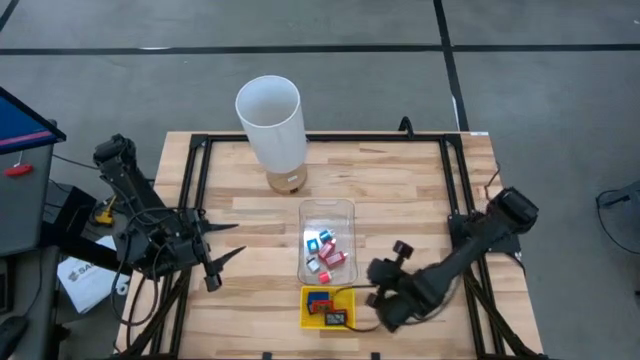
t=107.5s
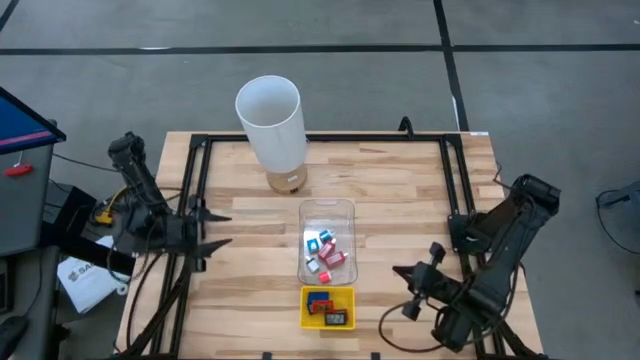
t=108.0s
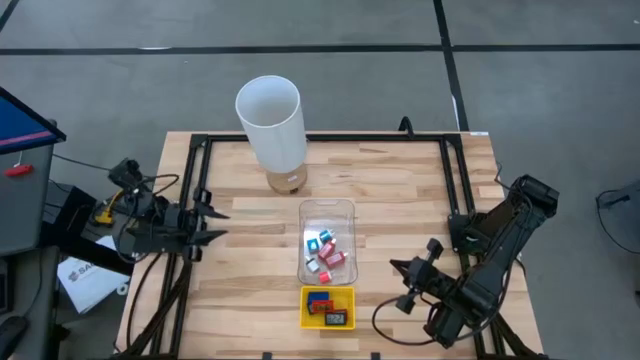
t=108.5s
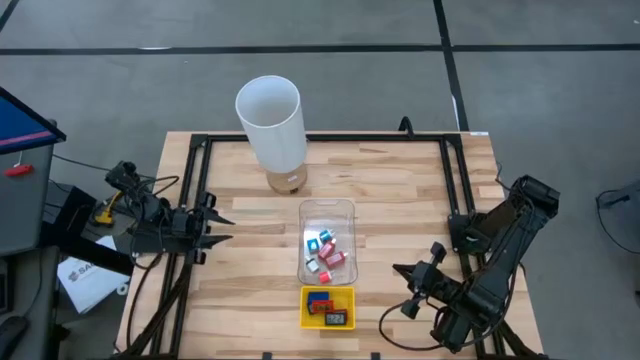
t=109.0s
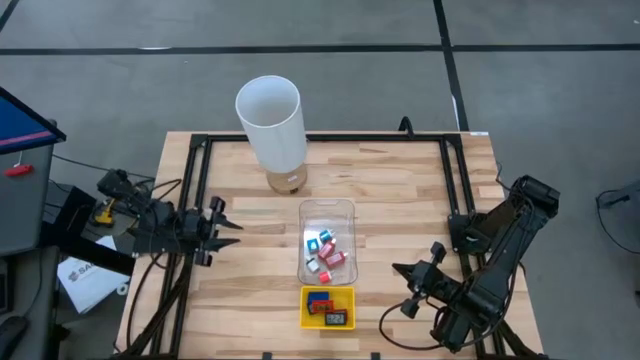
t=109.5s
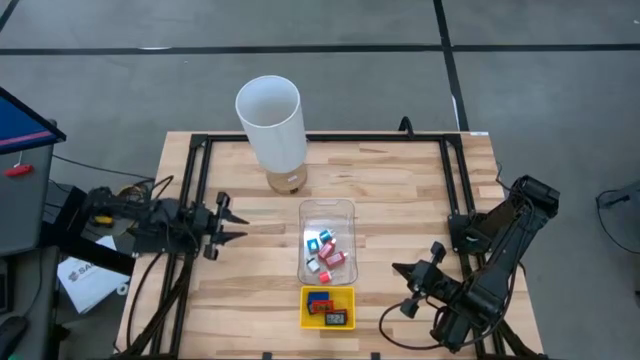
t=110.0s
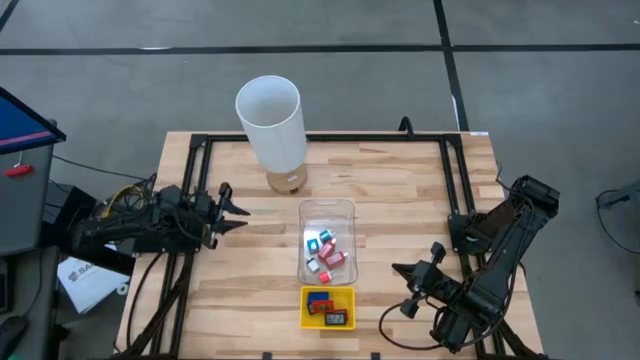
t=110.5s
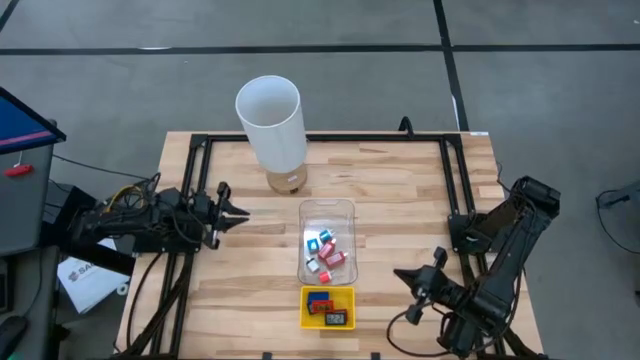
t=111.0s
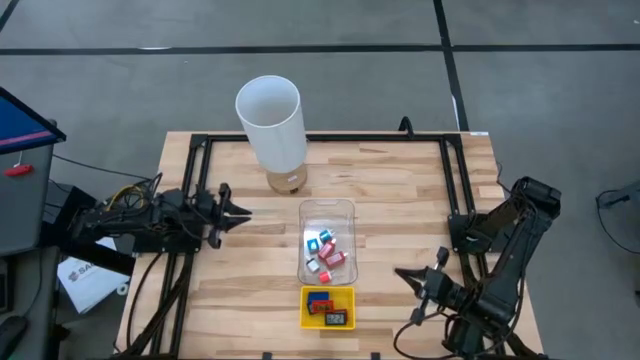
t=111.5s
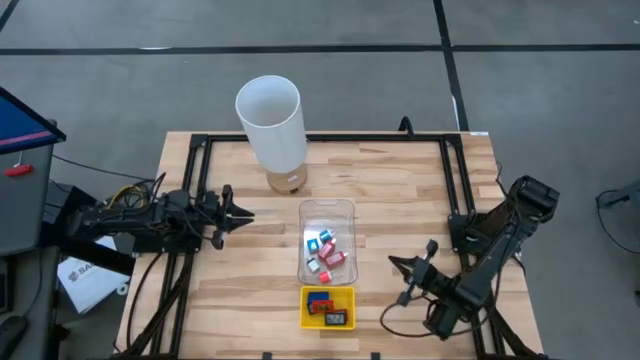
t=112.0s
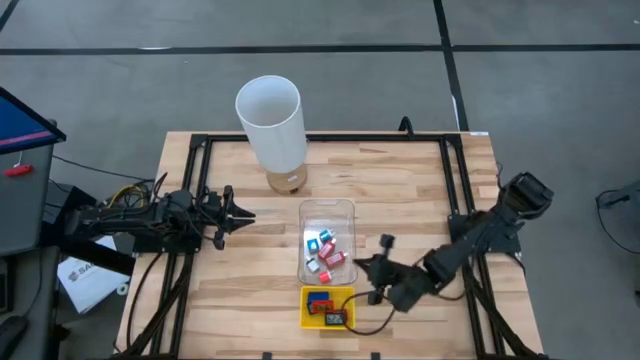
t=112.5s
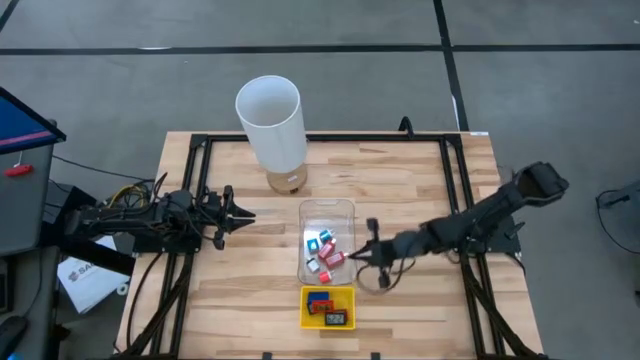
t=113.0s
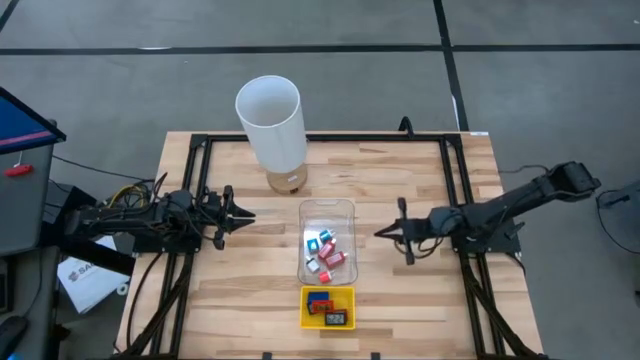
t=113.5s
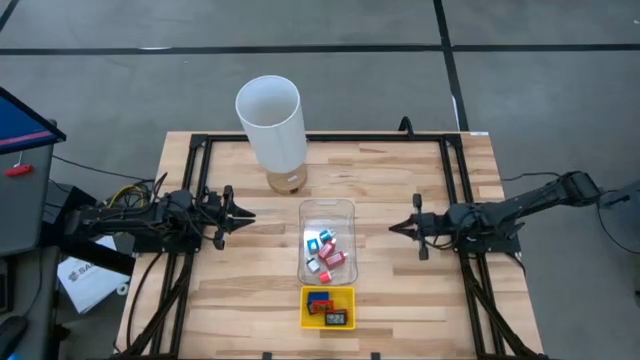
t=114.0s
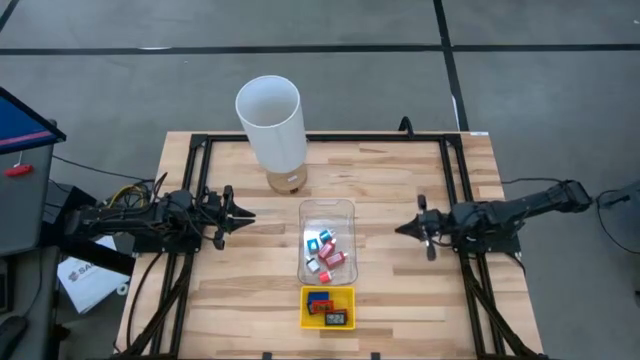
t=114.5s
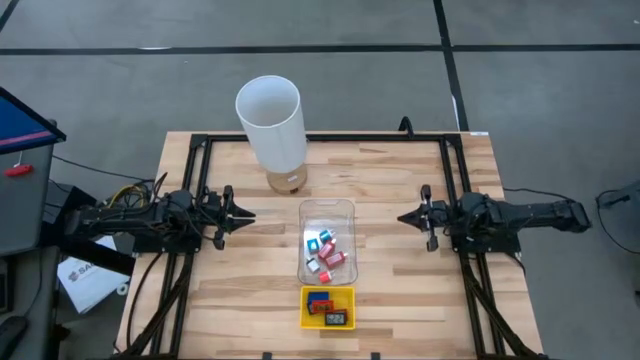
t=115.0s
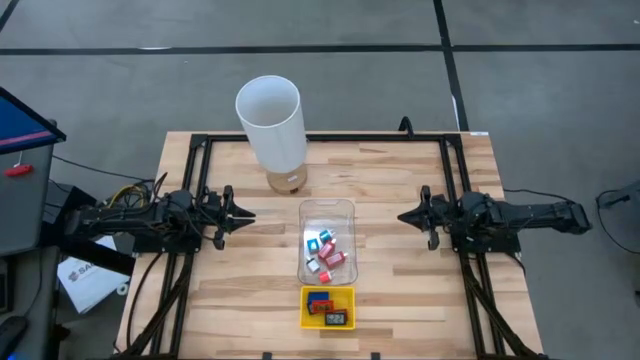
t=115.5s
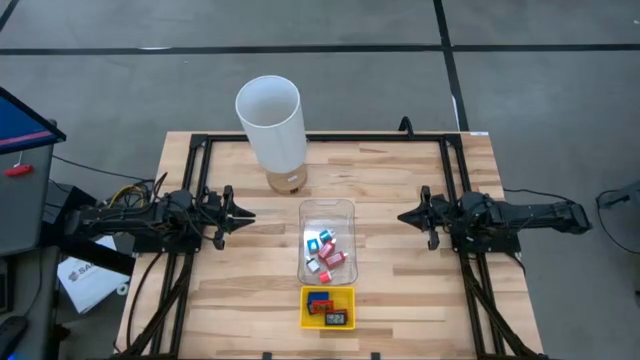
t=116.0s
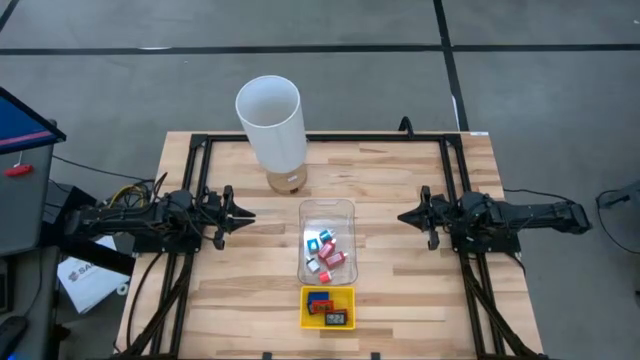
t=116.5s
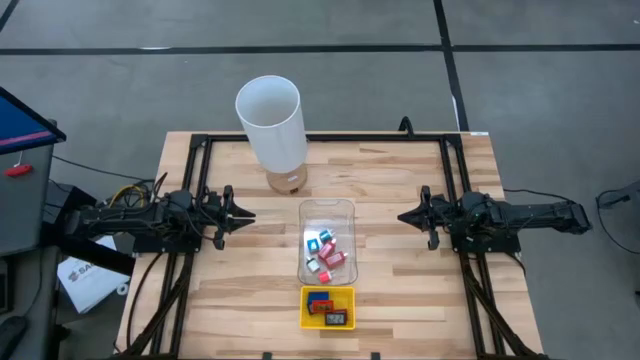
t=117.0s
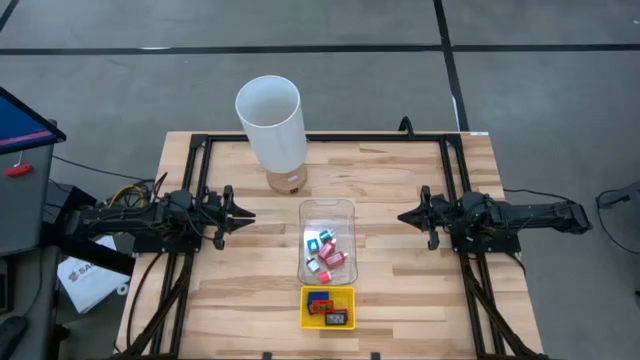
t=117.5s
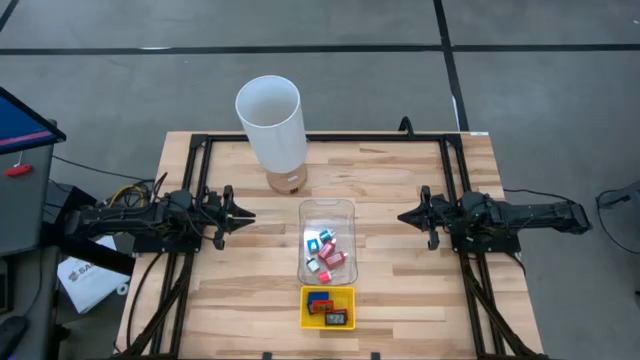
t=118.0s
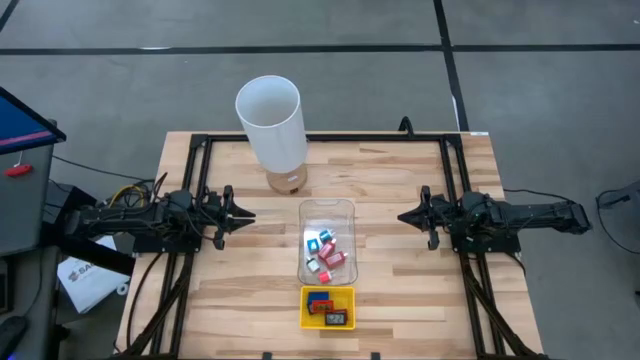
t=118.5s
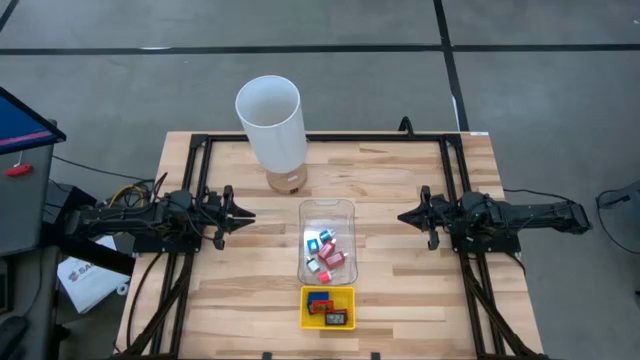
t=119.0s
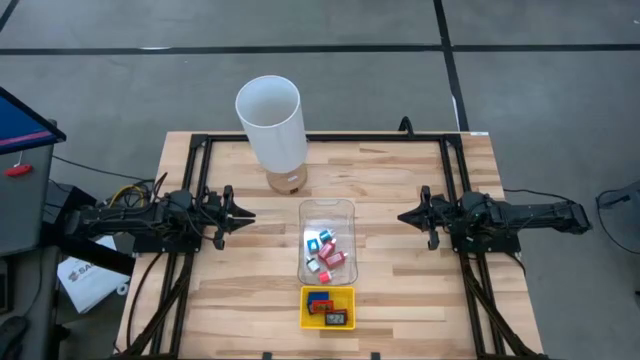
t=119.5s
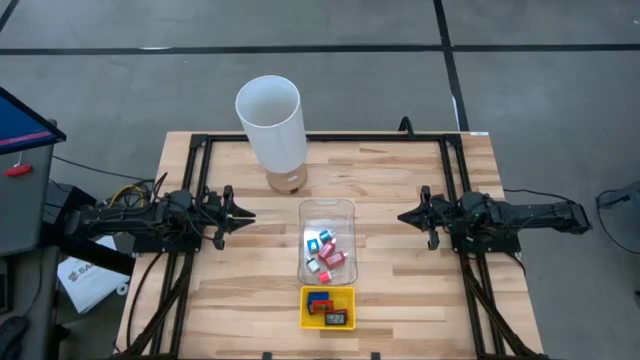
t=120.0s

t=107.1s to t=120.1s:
Task: Pick & Place Office items
Return to Home Position

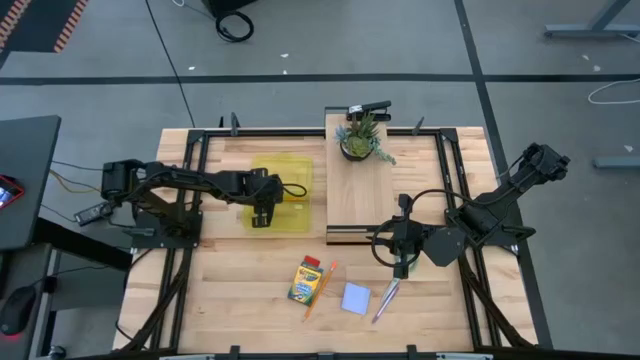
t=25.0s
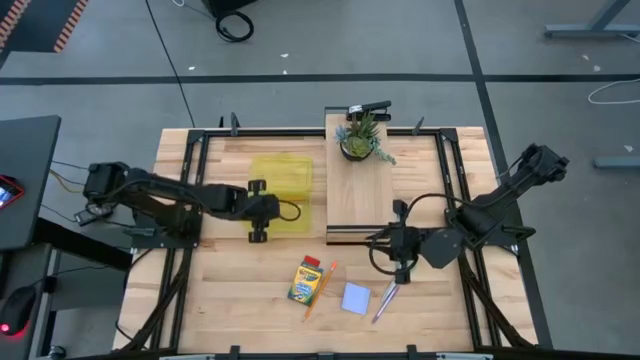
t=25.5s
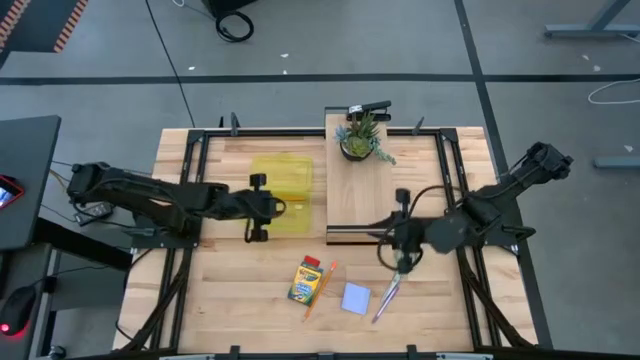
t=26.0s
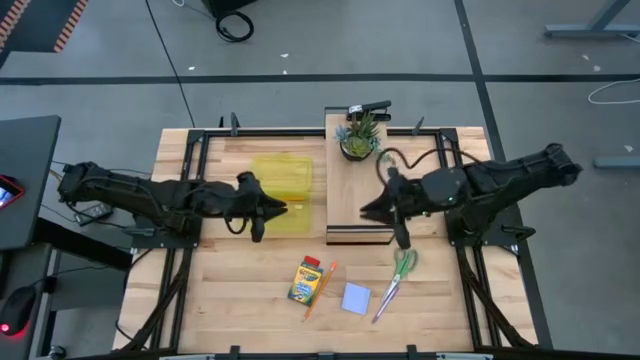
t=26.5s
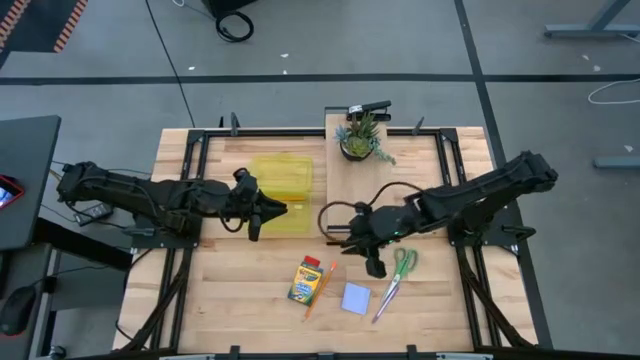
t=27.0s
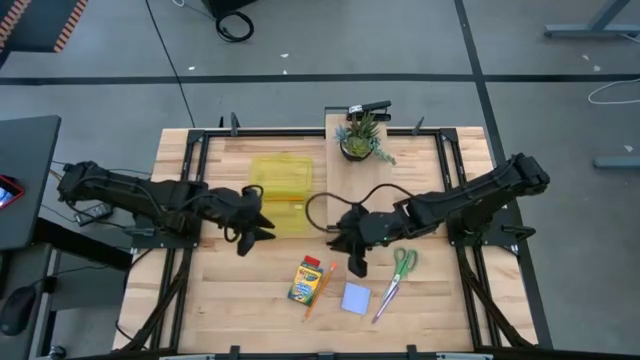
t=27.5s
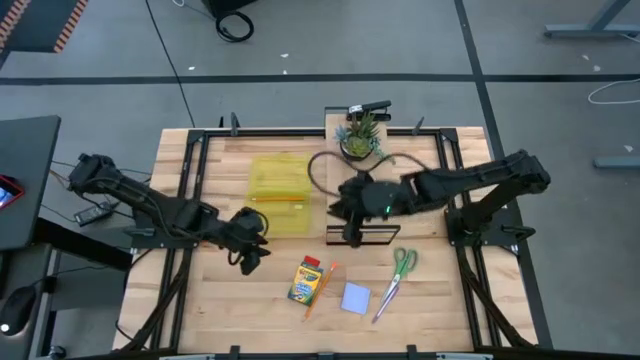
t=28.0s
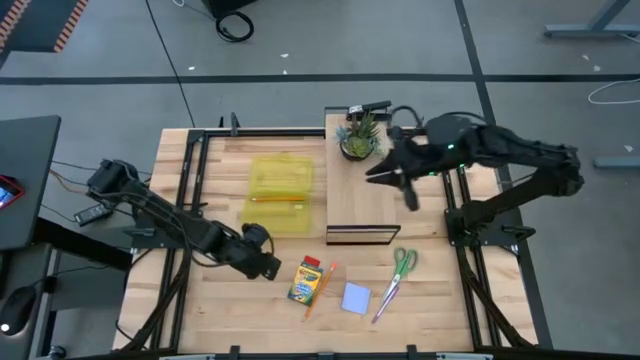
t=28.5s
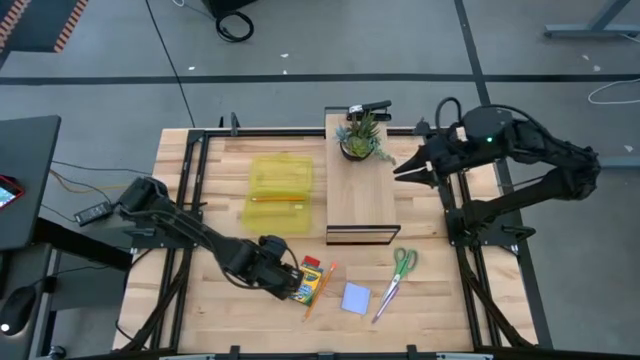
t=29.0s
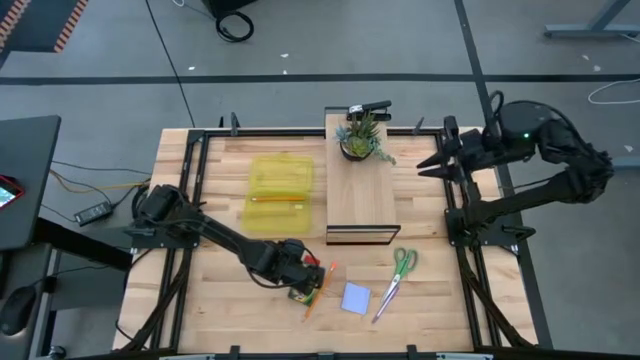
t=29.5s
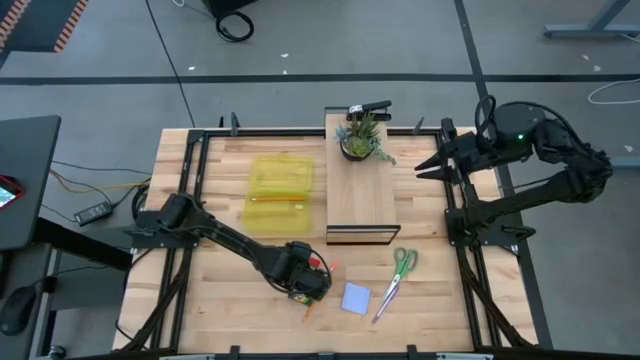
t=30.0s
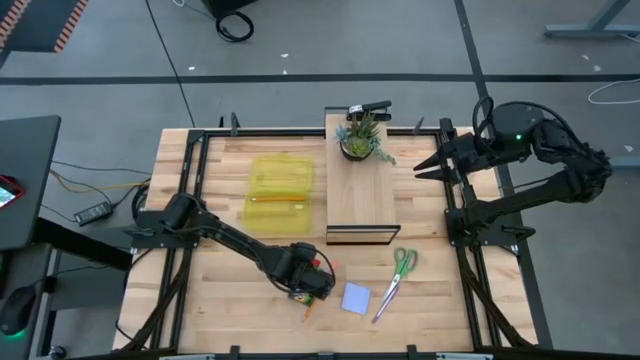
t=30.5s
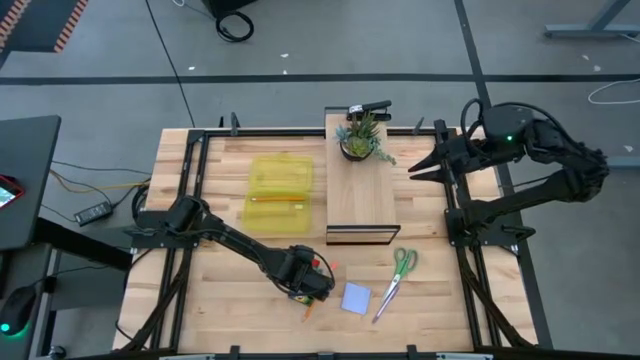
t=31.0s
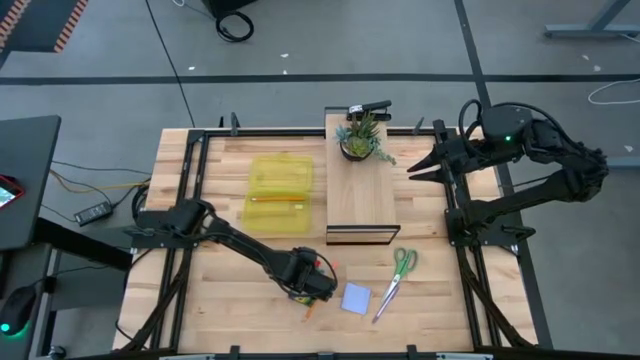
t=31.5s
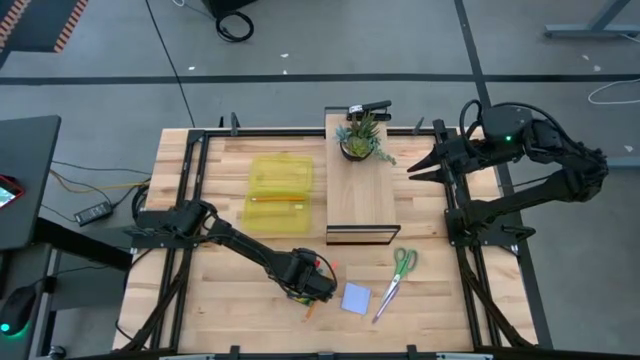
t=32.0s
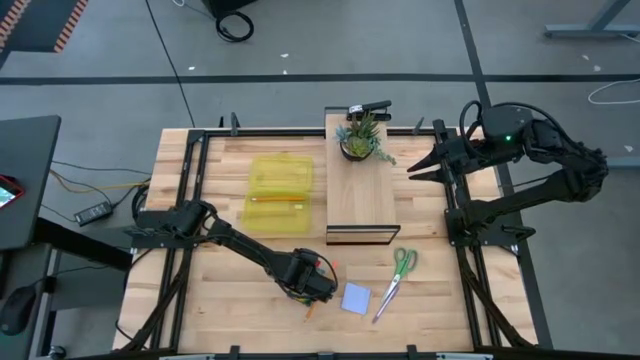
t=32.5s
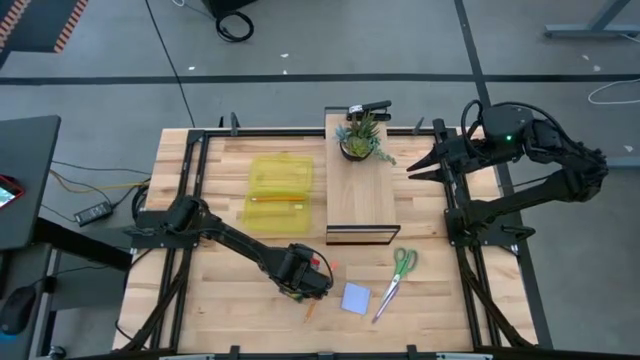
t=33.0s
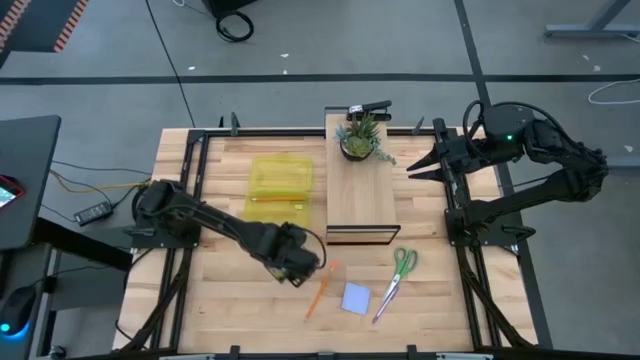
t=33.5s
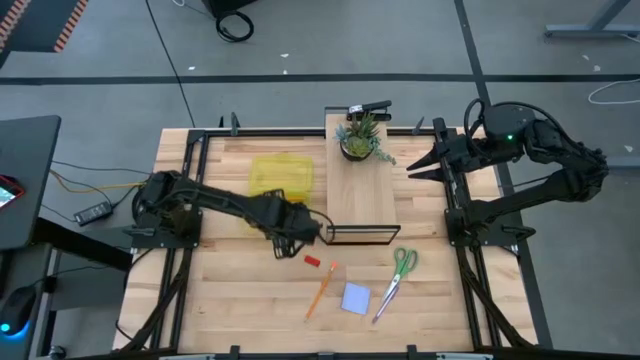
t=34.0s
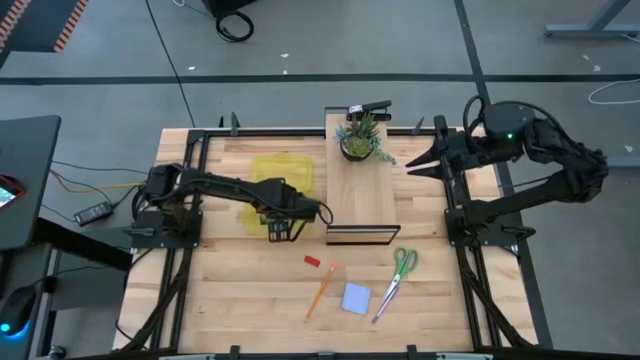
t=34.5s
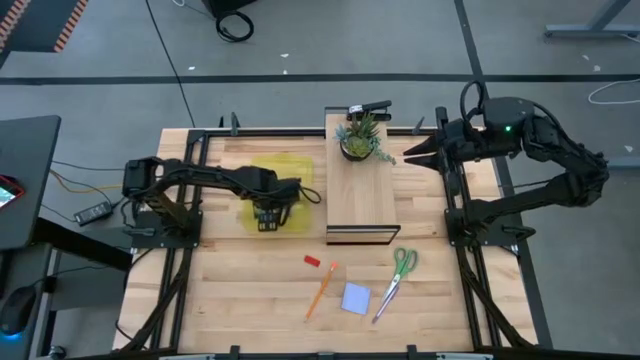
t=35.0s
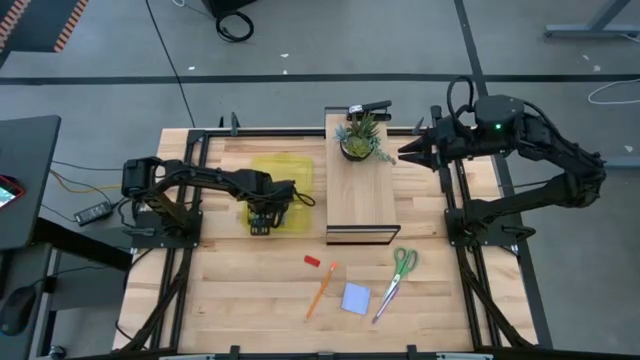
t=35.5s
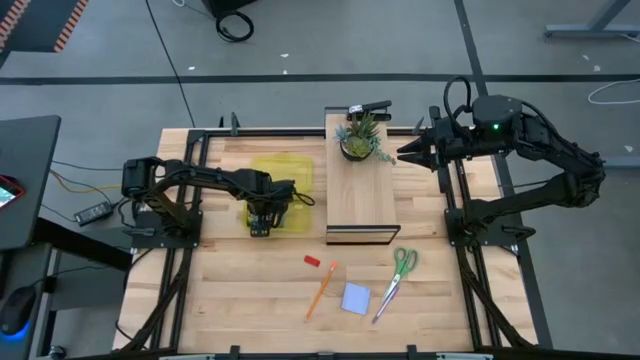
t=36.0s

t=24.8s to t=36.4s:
Task: Pack school essentials
Put the crayon box into the supply box
